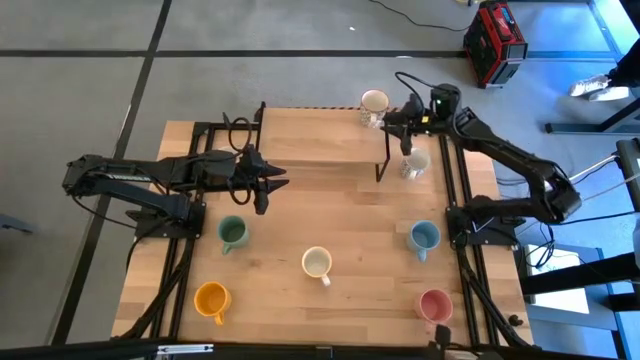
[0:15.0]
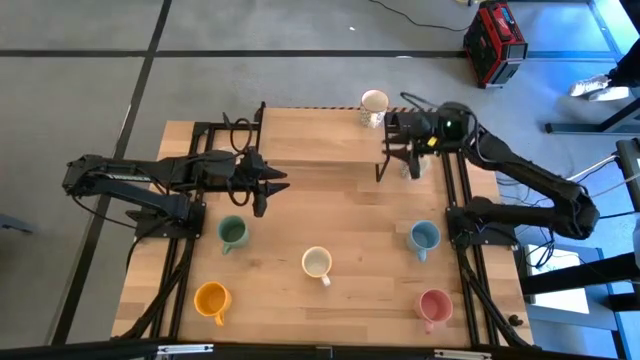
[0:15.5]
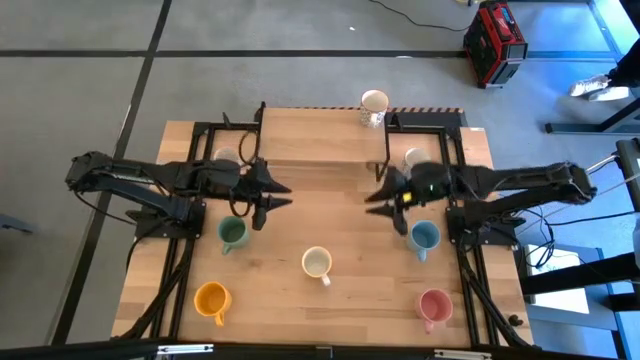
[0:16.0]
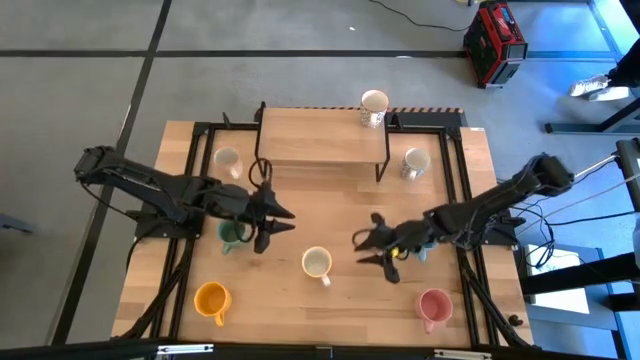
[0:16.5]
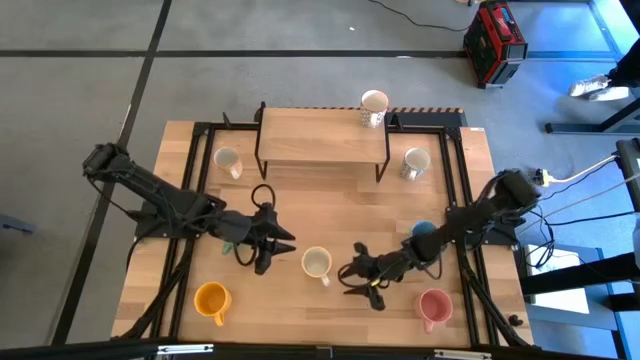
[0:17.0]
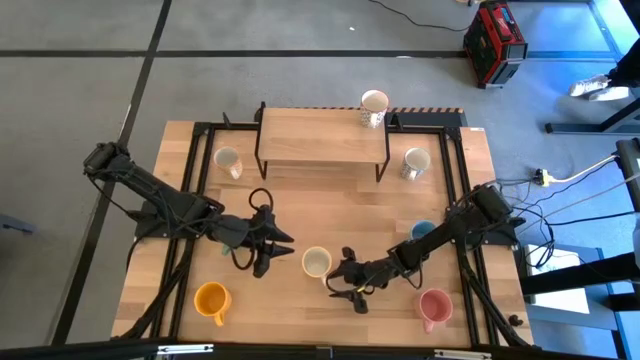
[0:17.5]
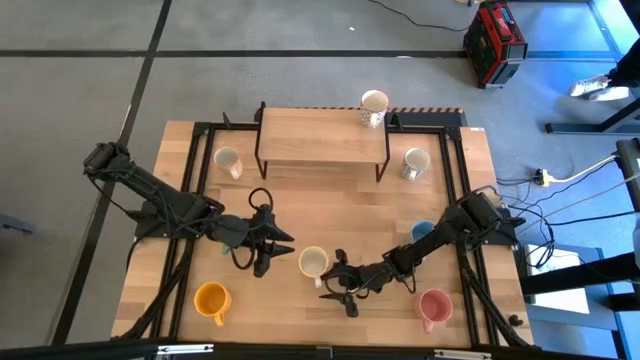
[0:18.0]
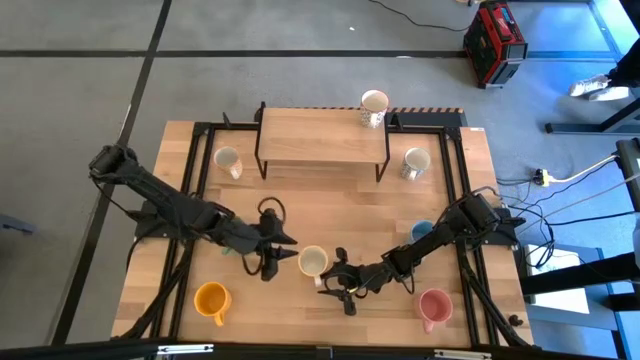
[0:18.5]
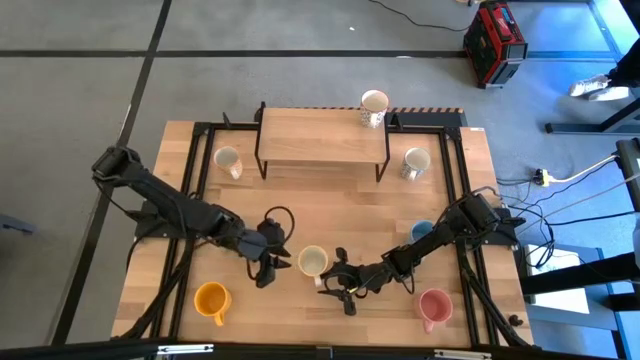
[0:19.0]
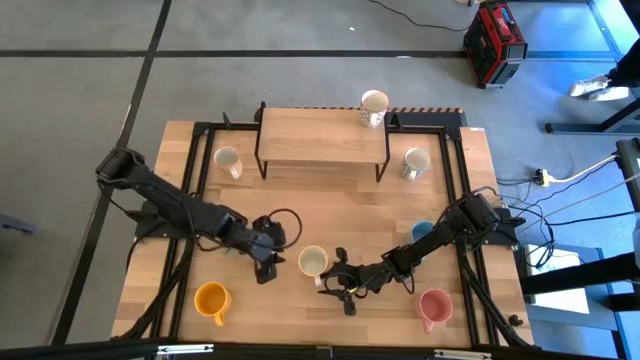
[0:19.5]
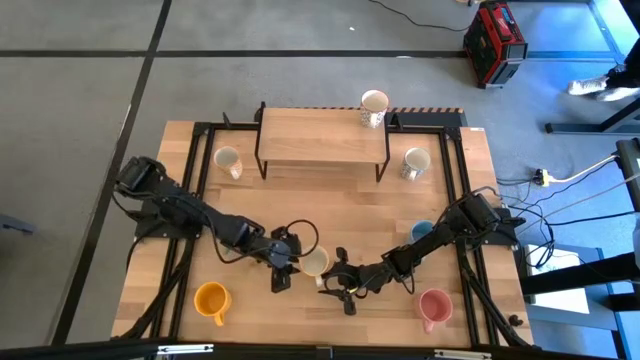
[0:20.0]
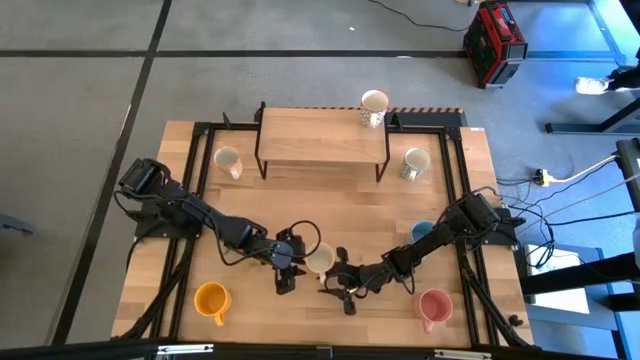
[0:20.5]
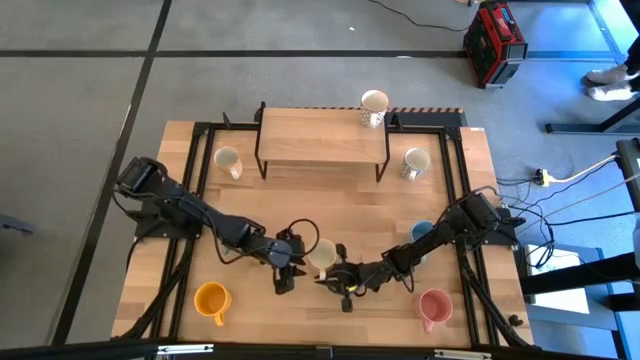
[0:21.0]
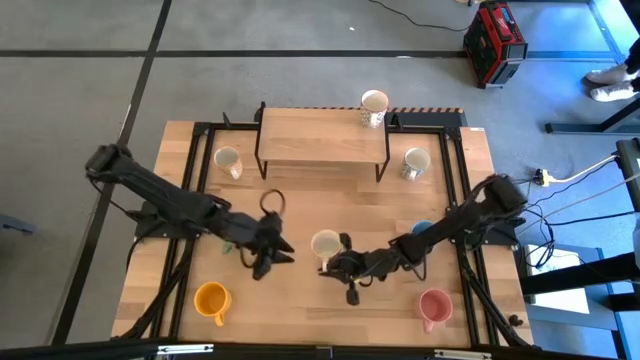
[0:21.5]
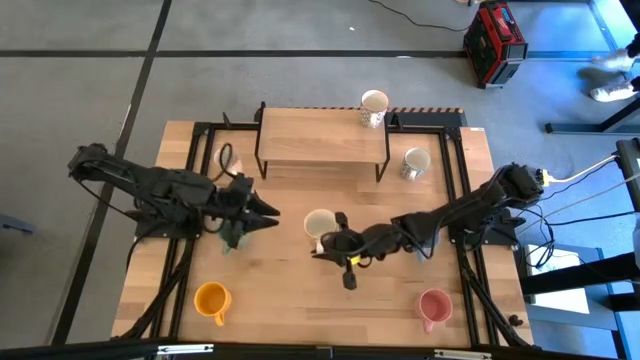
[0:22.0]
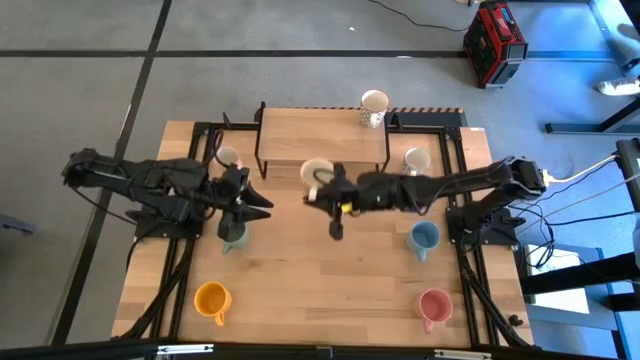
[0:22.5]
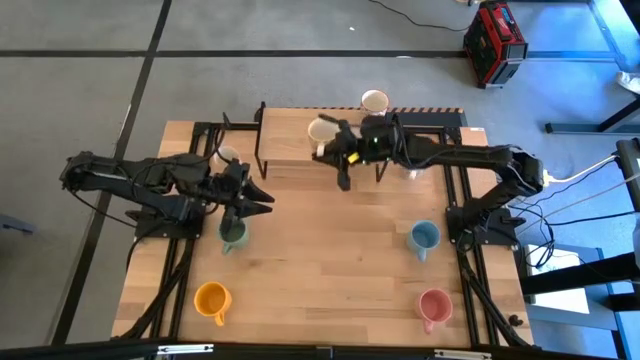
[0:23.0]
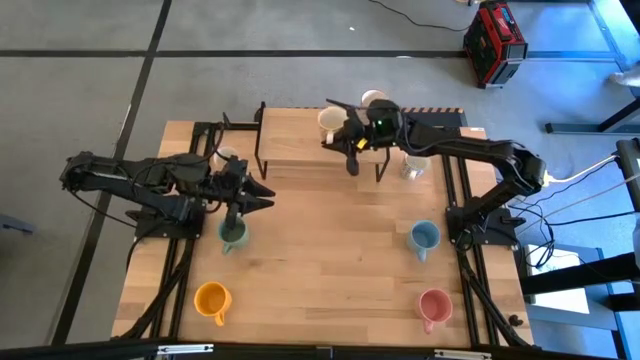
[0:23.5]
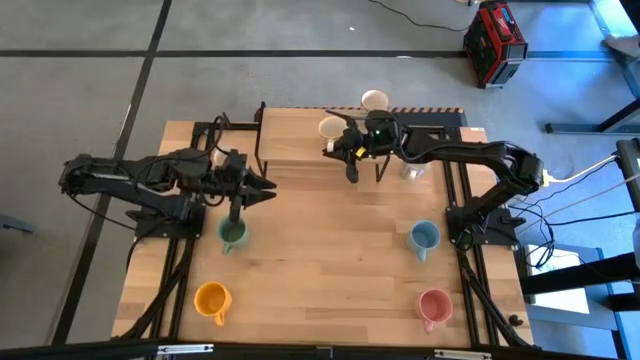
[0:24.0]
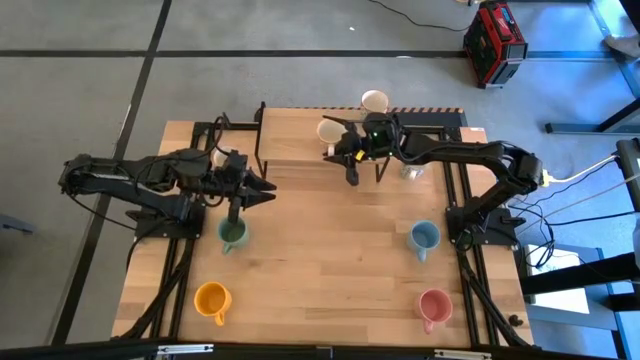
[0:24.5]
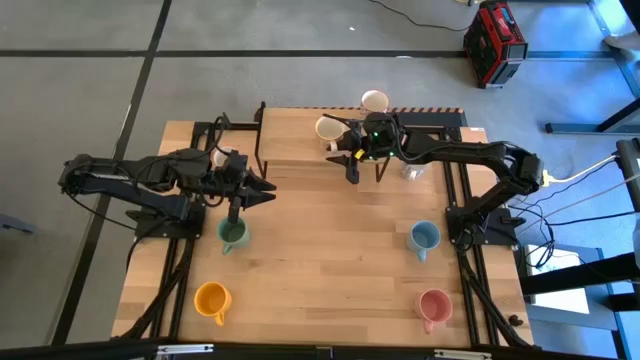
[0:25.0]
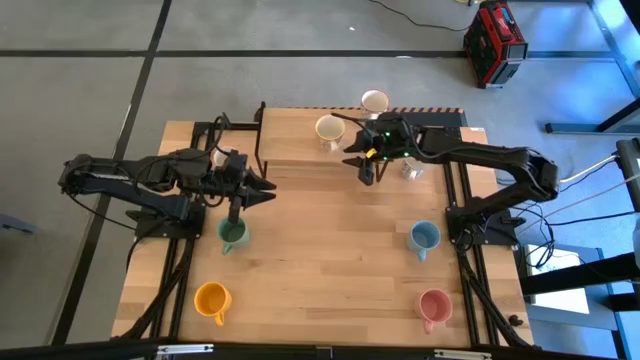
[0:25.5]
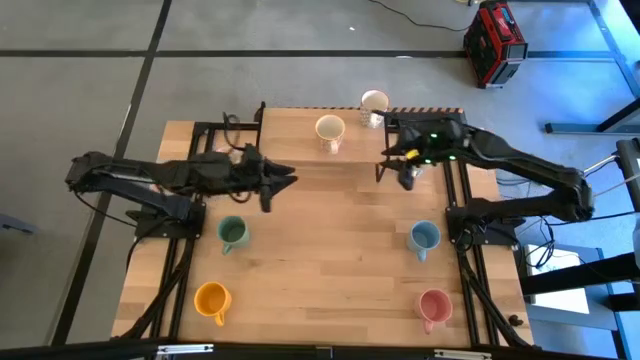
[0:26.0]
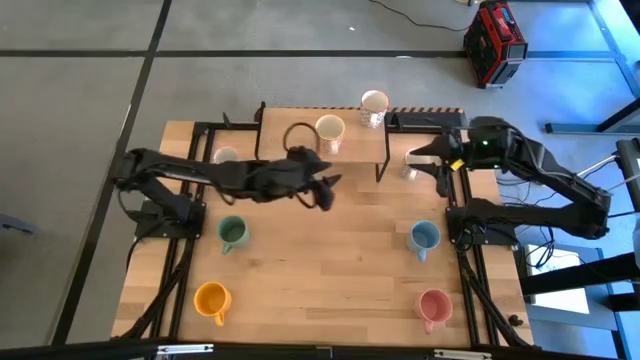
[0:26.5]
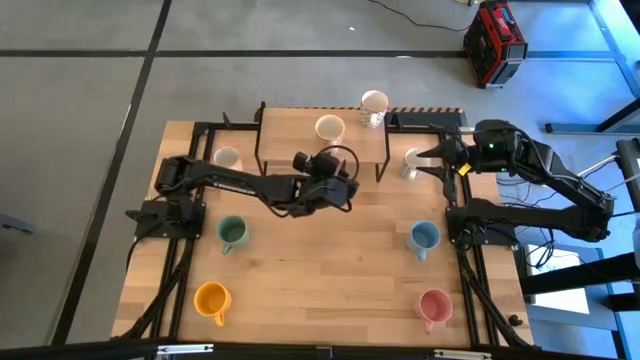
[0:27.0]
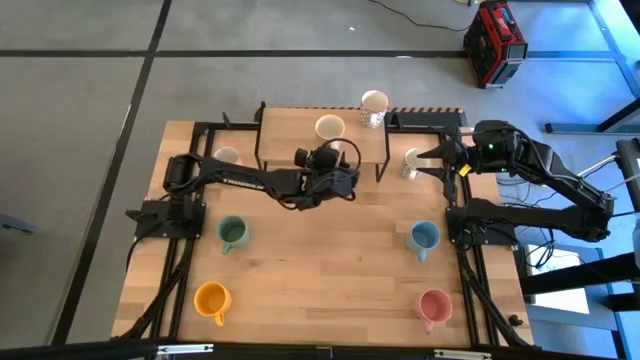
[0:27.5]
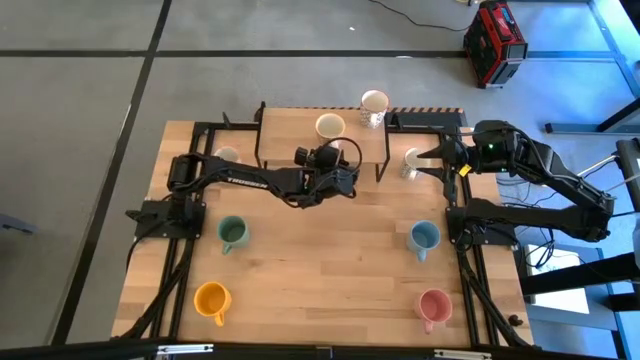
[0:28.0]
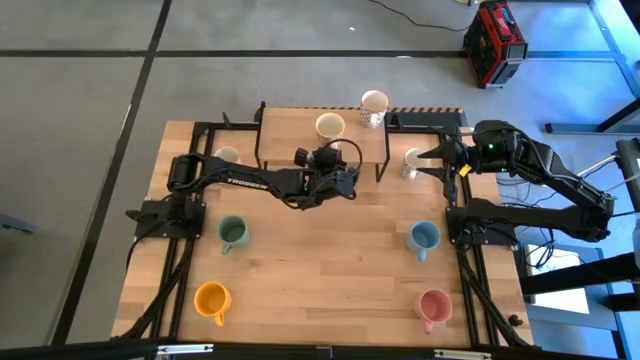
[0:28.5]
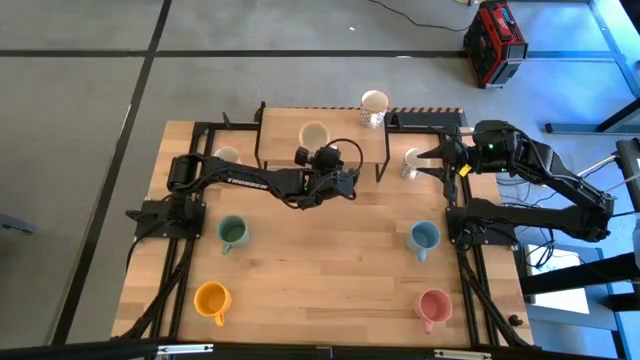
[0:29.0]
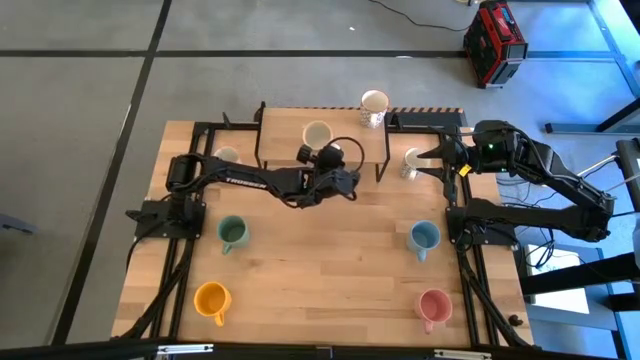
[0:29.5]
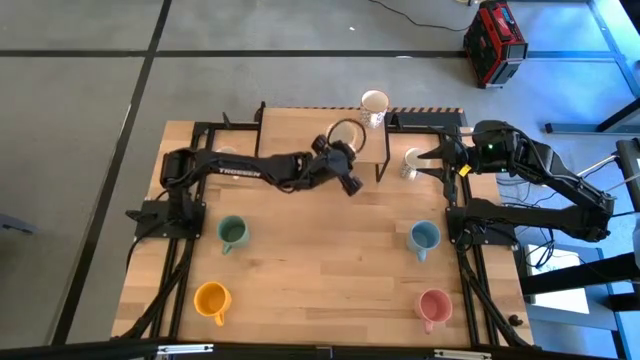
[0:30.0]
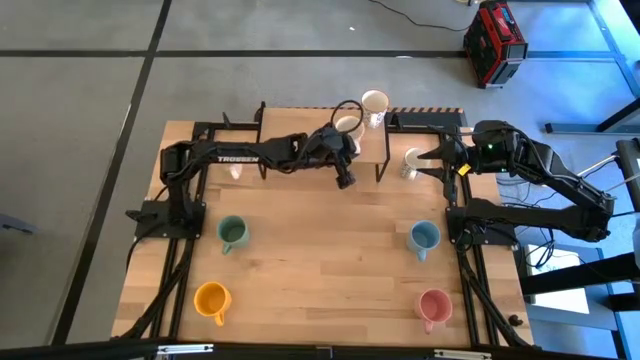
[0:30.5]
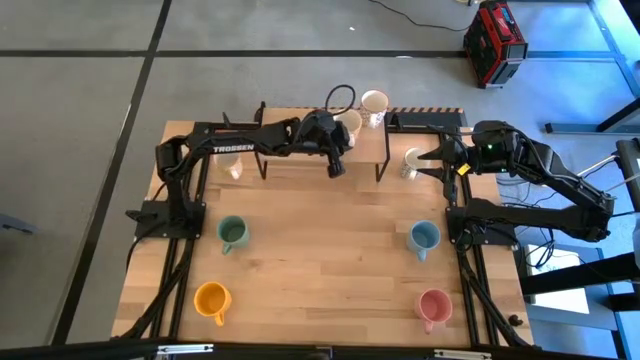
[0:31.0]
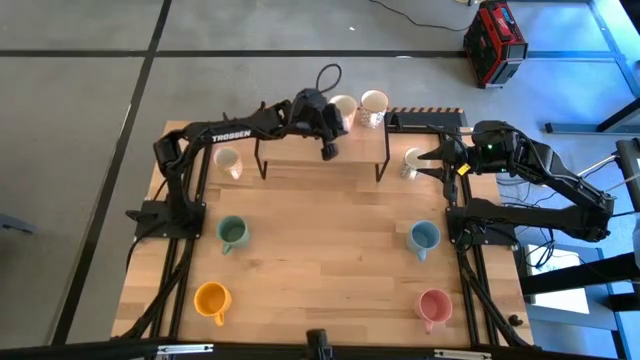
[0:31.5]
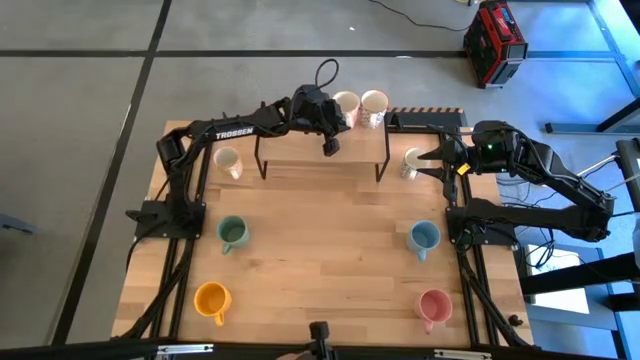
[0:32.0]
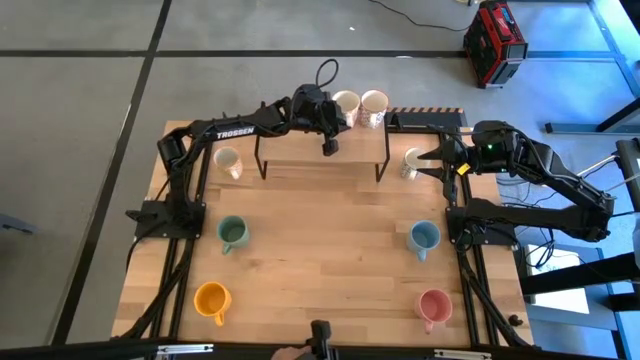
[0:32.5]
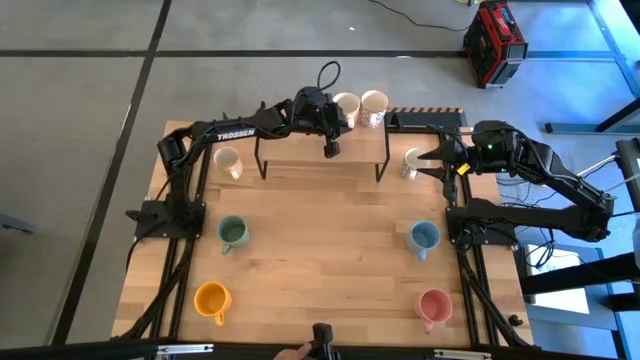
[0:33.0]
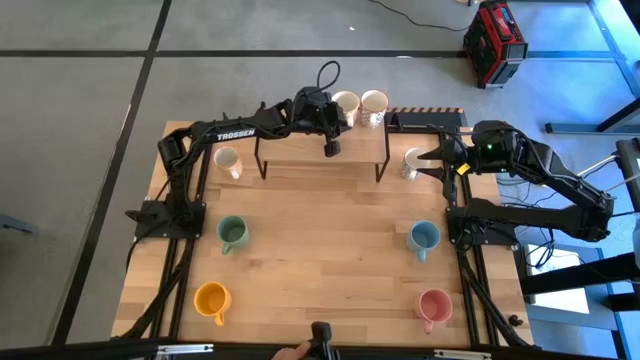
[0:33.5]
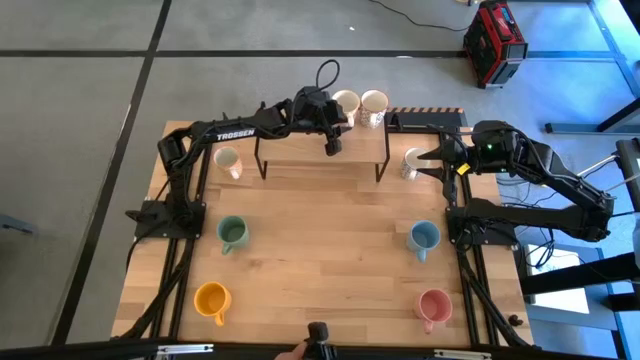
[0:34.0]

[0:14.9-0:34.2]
Task: Place coffee mugs
Put the orange patterned mug on the shelf

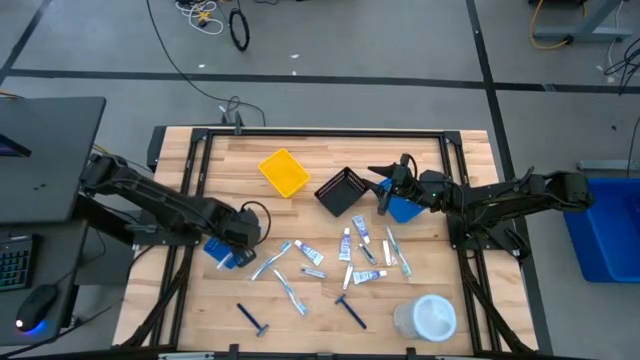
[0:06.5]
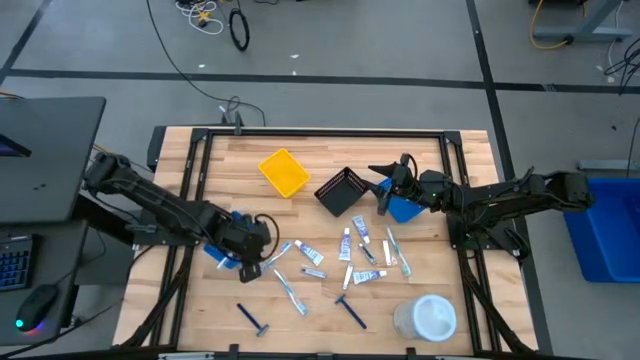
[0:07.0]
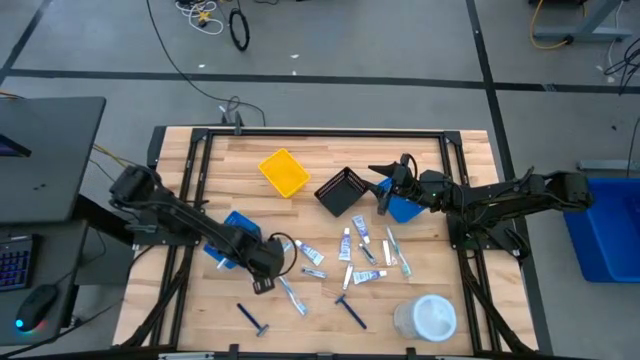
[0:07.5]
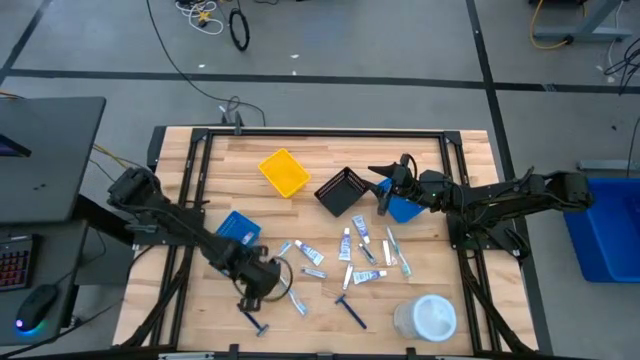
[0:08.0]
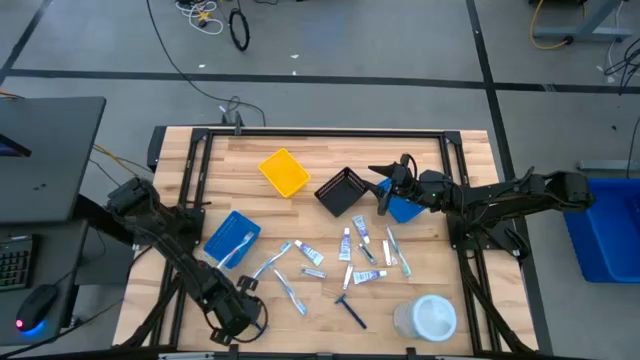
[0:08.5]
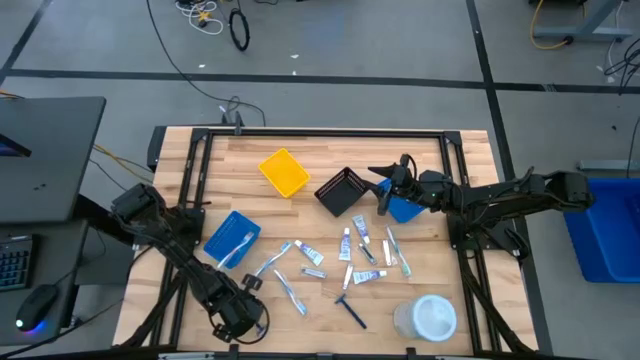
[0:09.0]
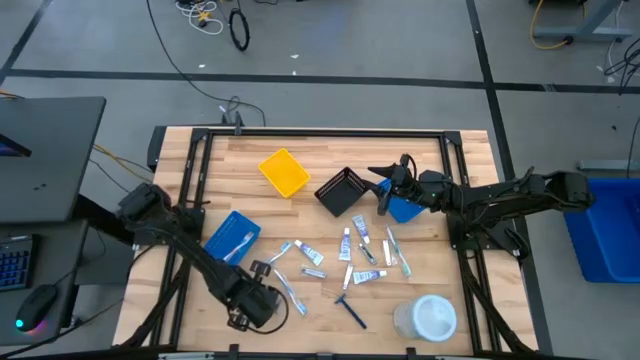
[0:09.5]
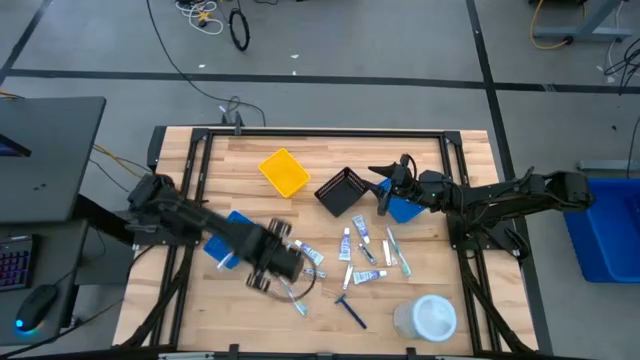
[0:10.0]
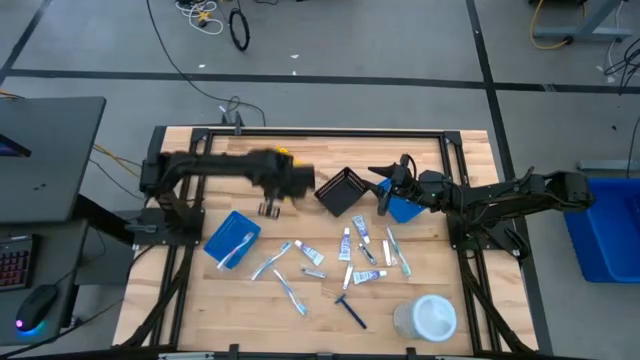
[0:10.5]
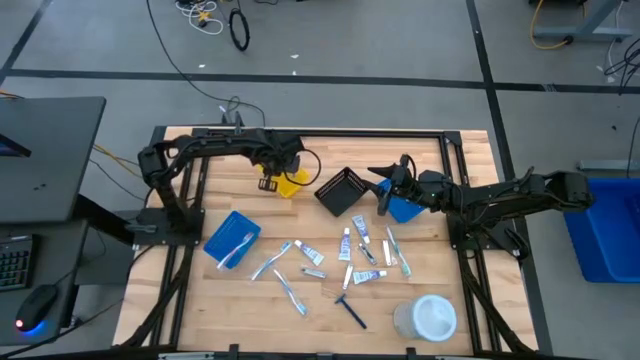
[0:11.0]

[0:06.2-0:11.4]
Task: Pick & Place Travel size toiletries
Put the blue razor into the yellow bin
